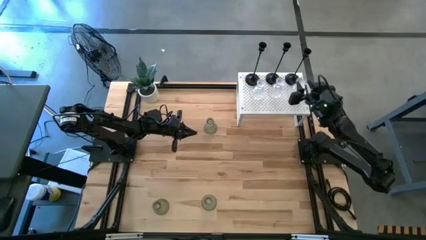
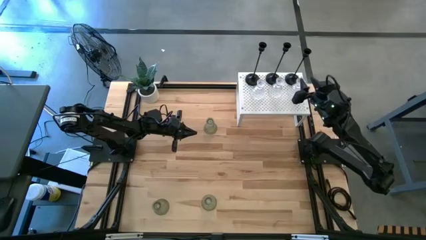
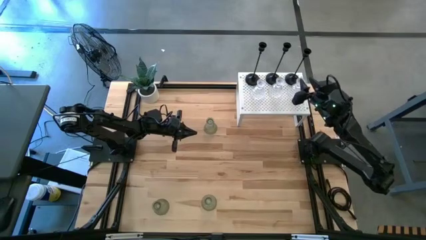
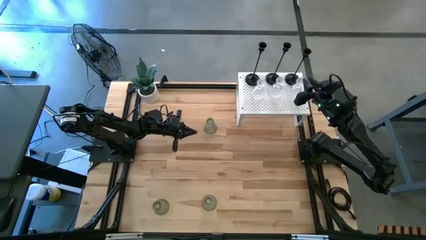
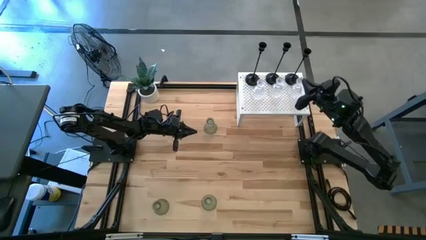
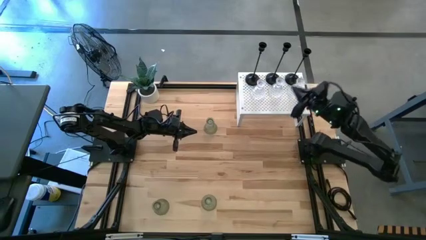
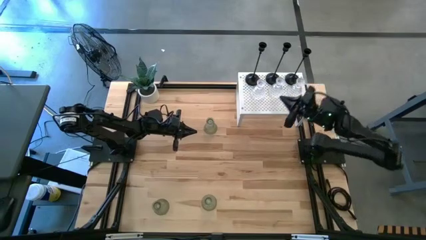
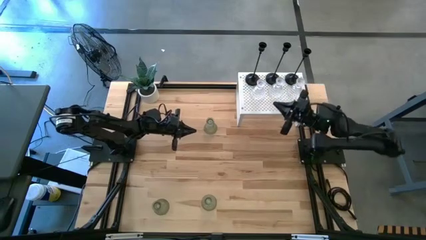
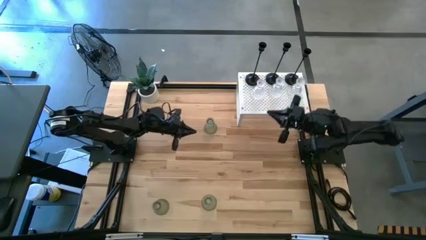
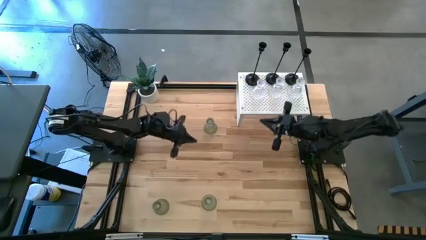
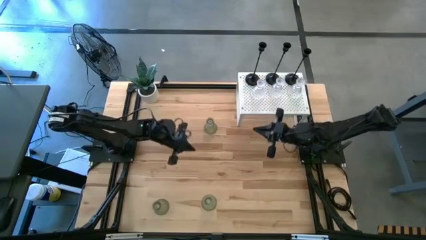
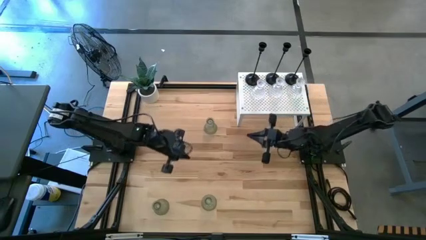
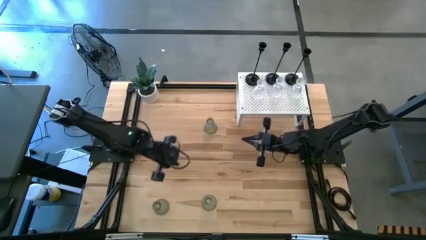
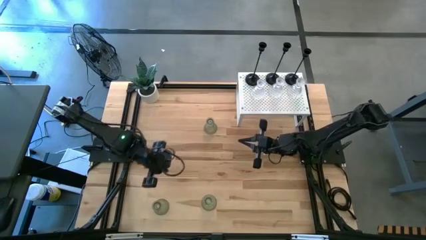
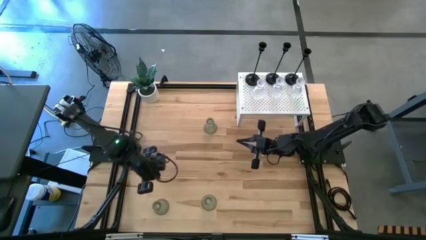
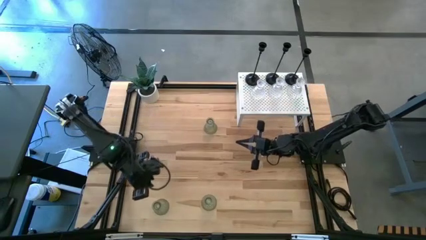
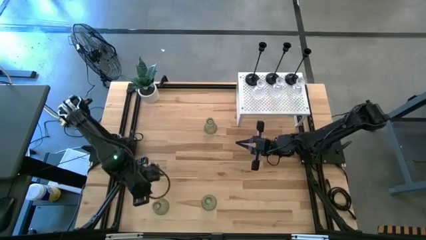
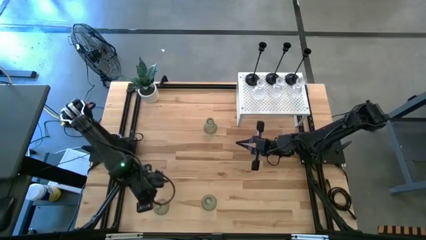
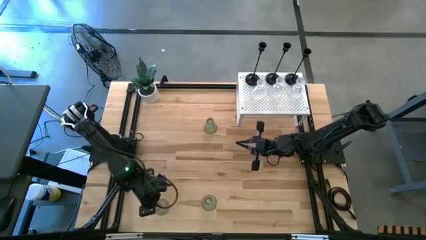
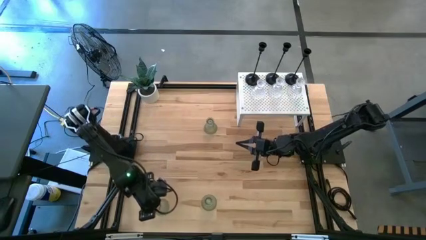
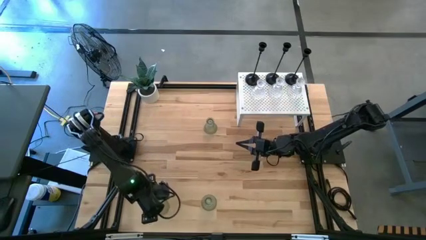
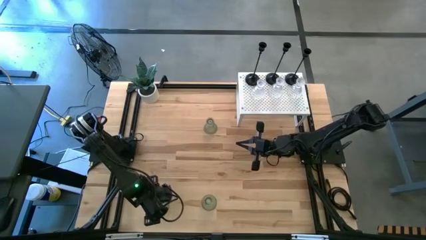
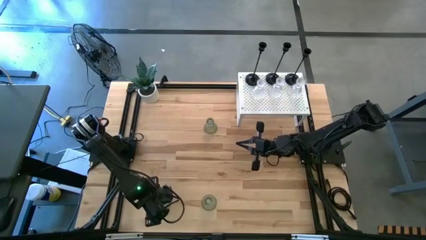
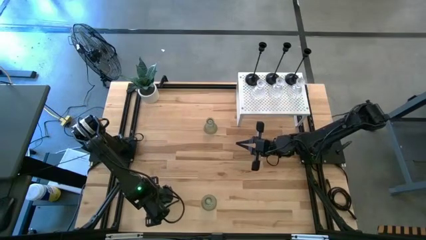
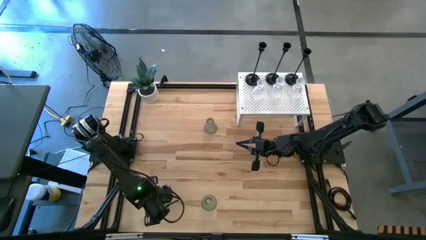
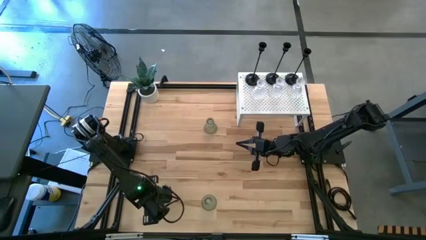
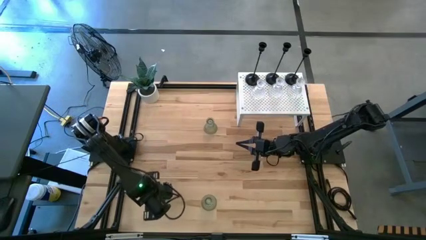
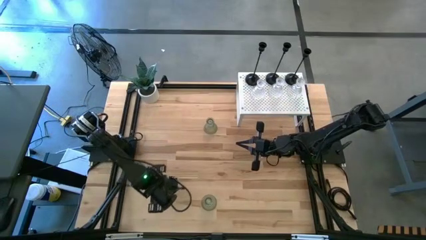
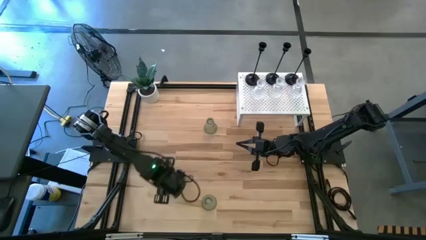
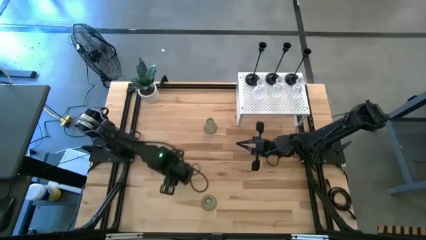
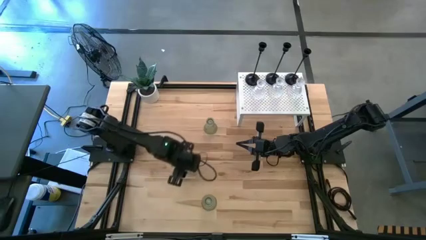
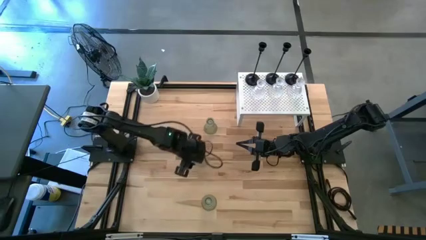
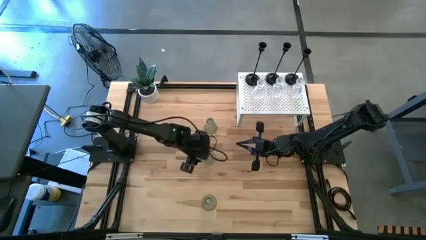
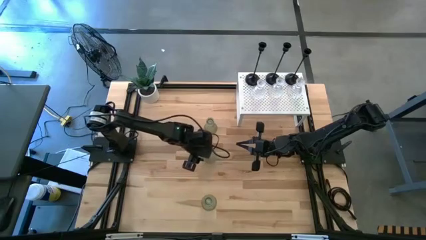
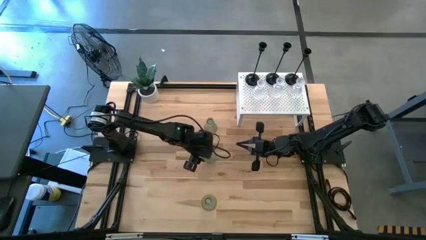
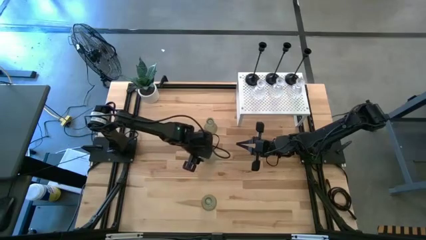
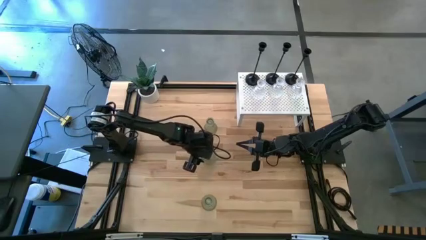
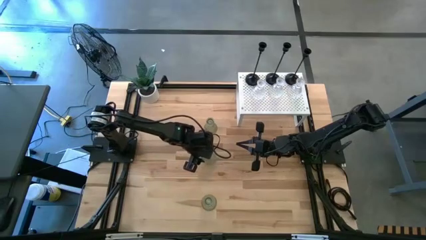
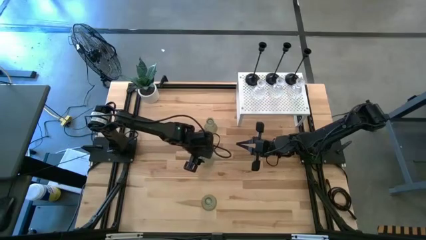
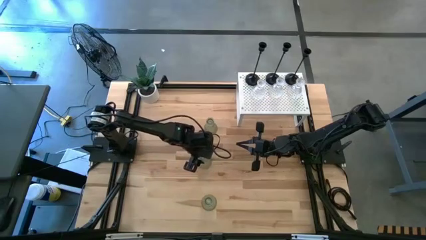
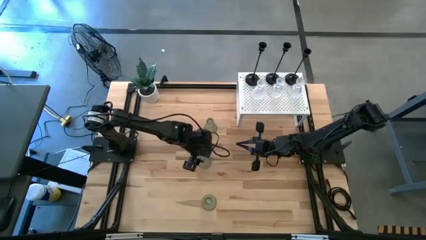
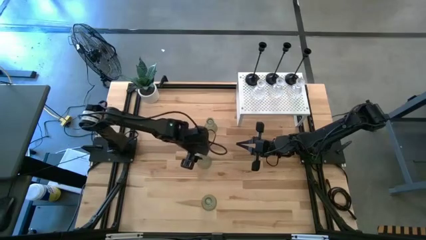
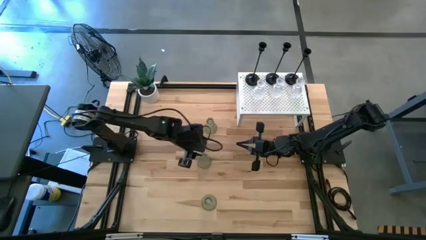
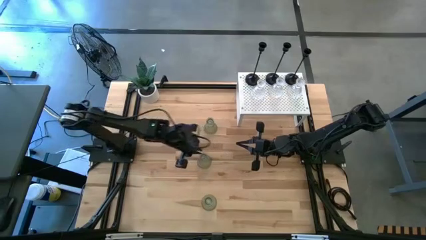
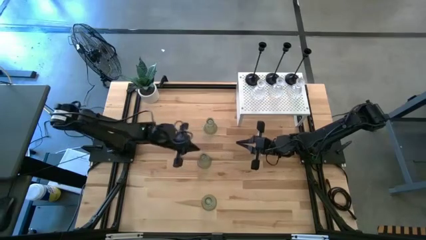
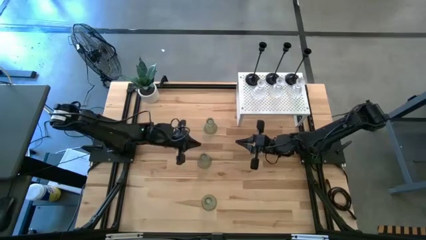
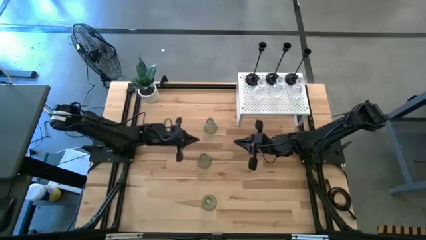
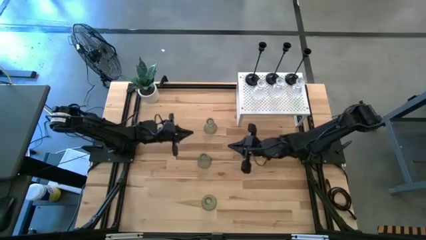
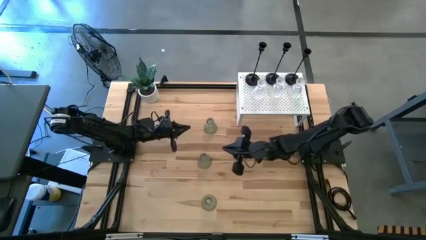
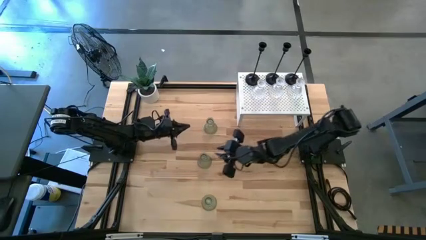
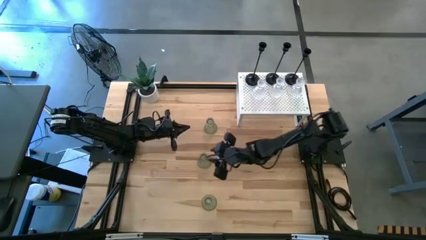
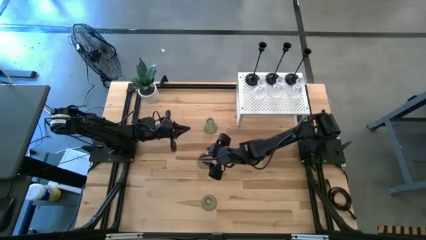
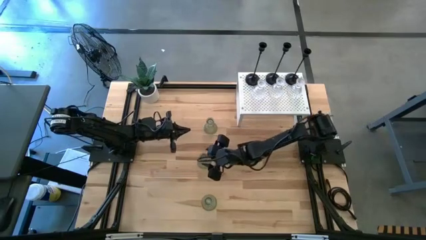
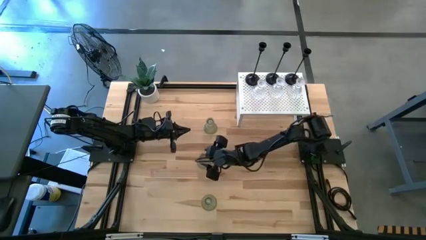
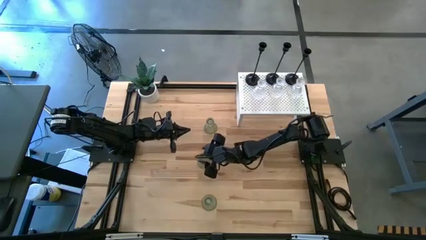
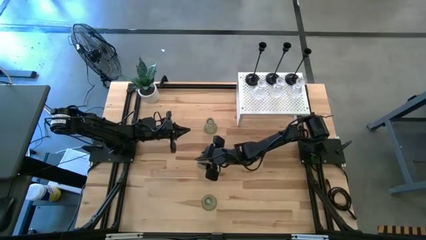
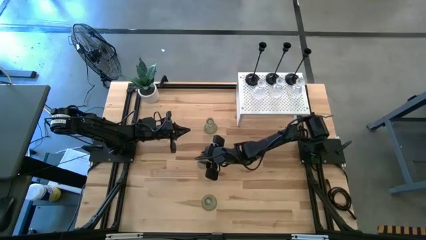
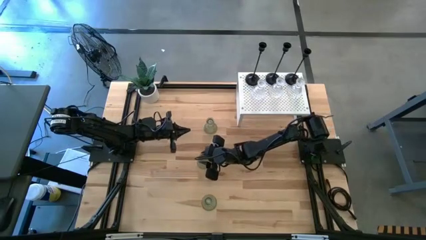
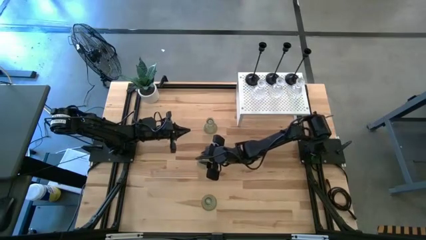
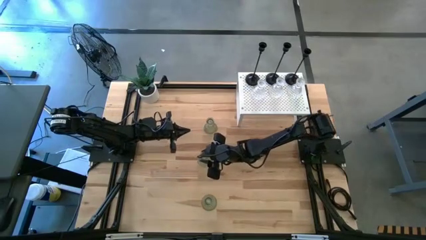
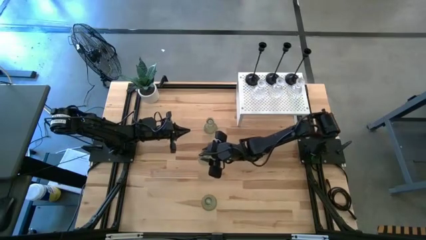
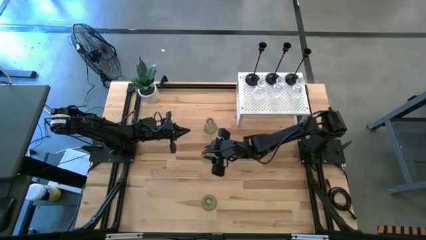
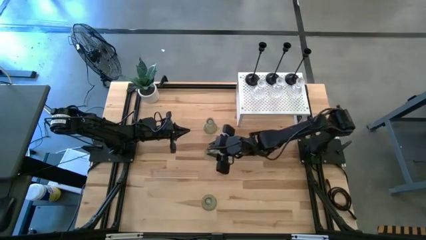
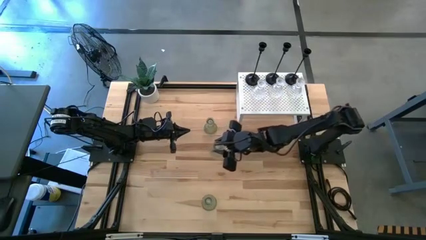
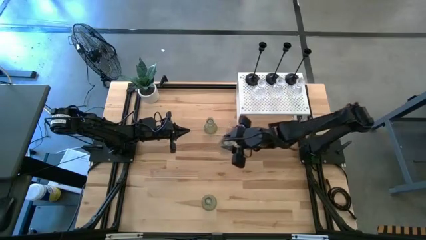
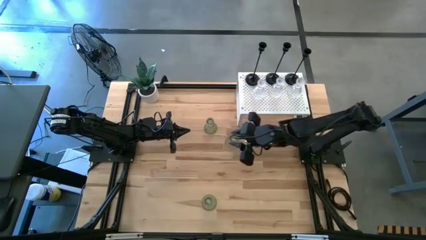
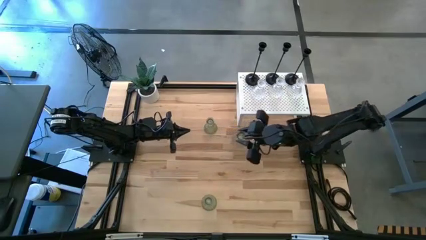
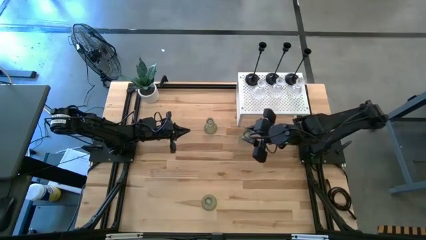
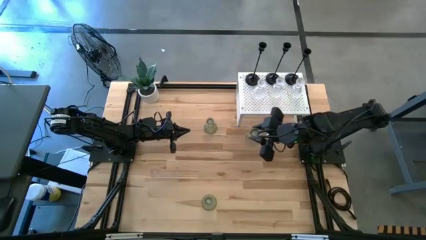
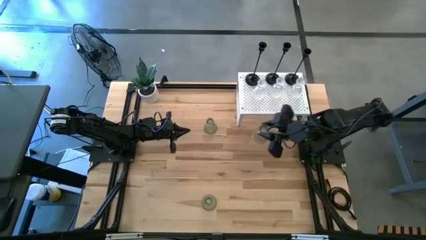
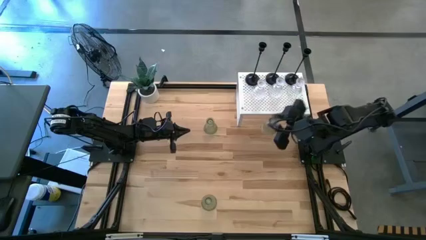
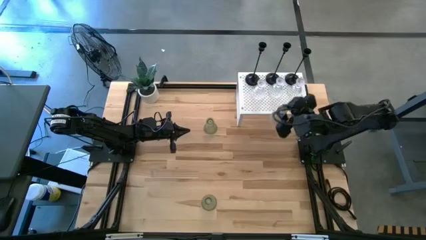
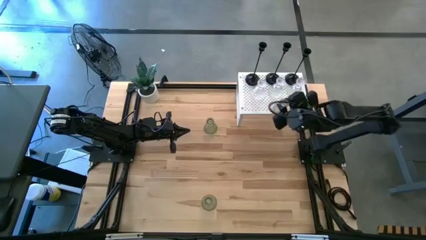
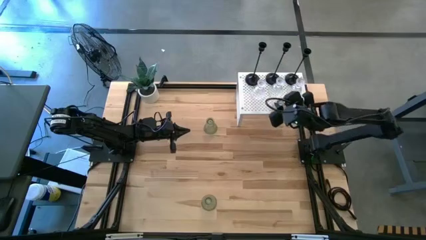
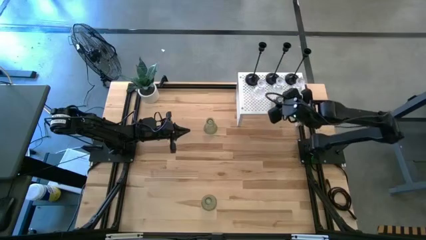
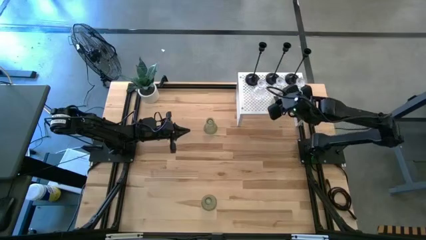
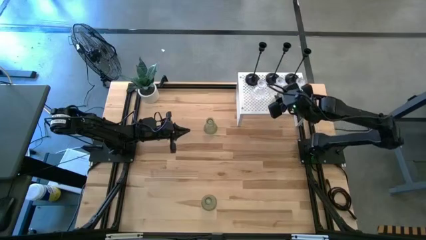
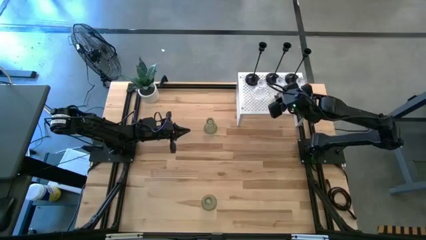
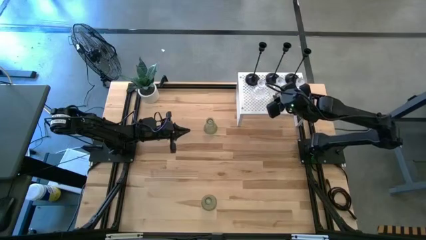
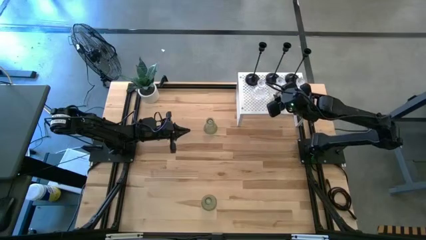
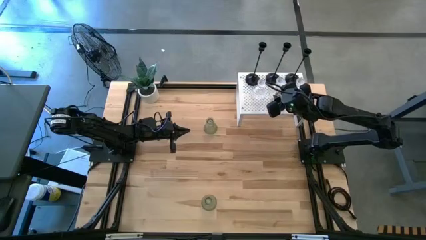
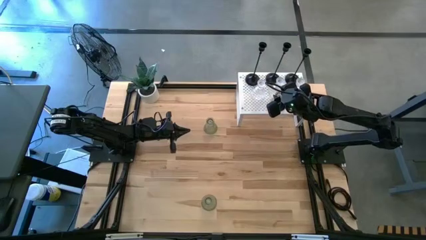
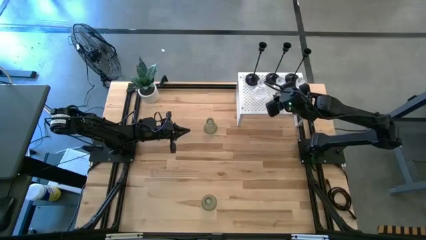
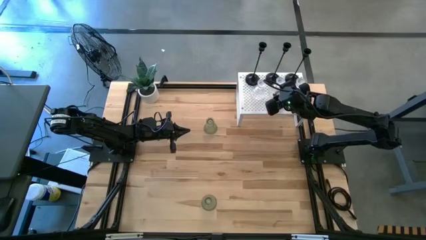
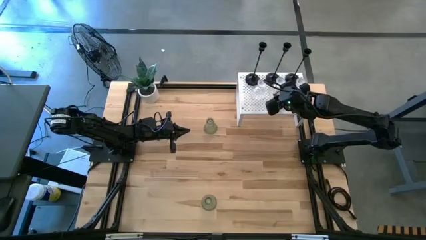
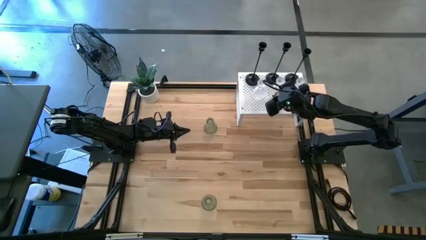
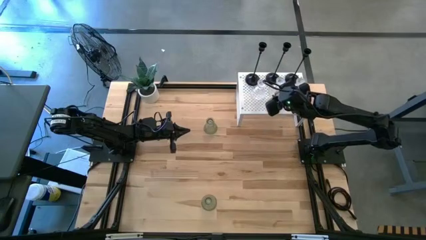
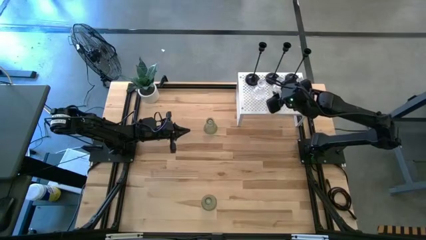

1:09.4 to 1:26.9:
Task: Pick & Place candle stick holders
Put the bottom left green glass candle holder on the shelf
